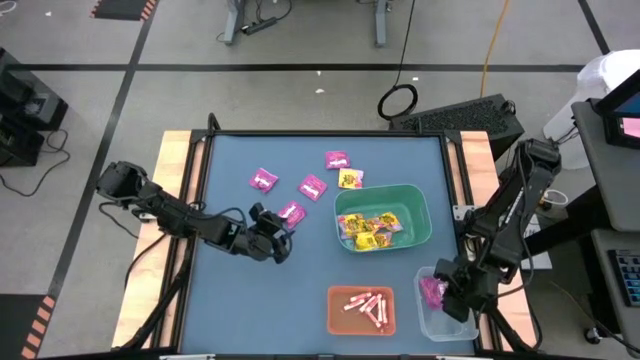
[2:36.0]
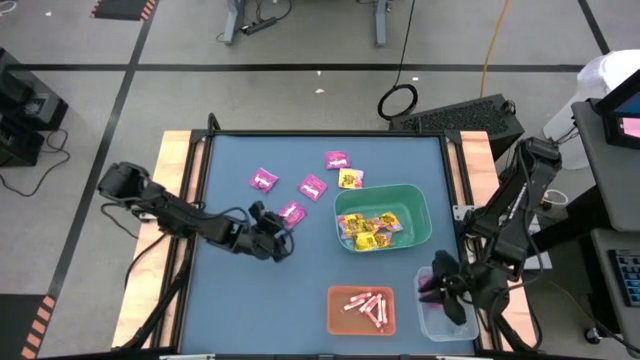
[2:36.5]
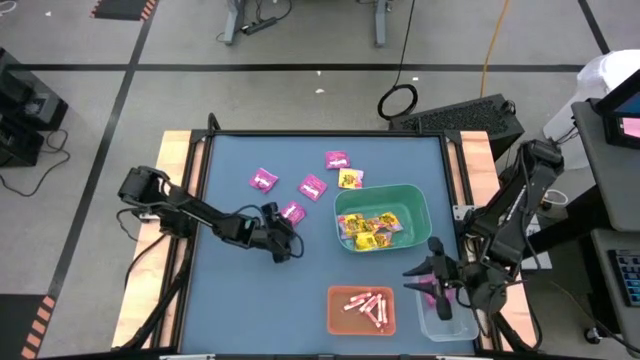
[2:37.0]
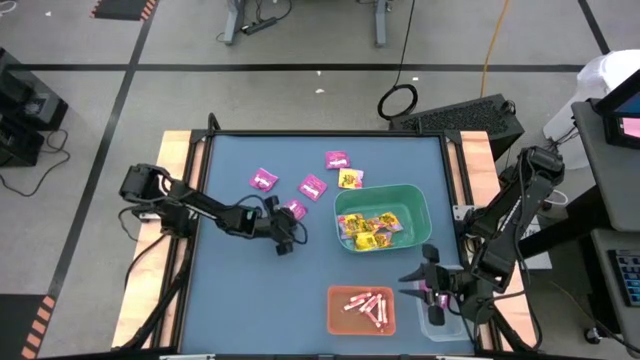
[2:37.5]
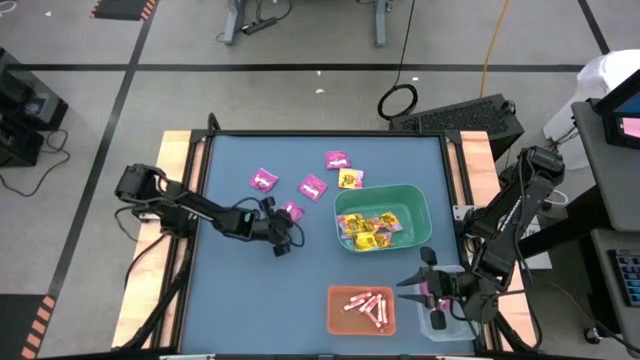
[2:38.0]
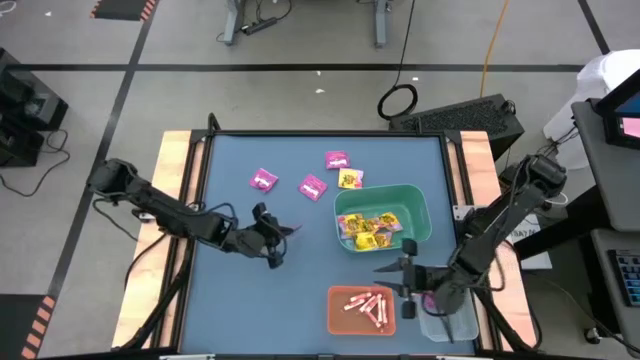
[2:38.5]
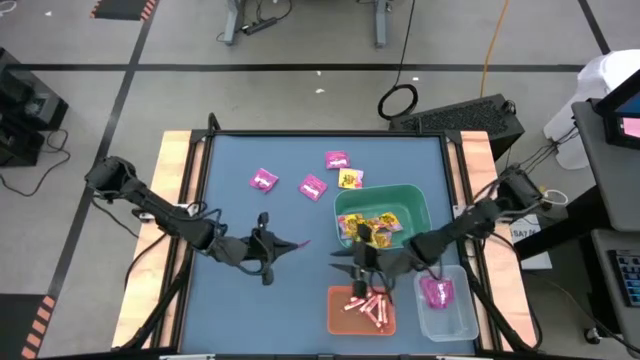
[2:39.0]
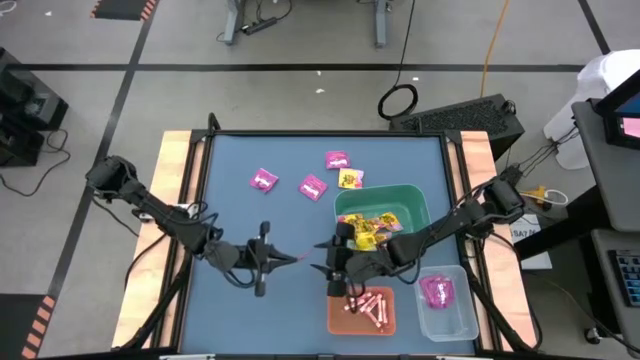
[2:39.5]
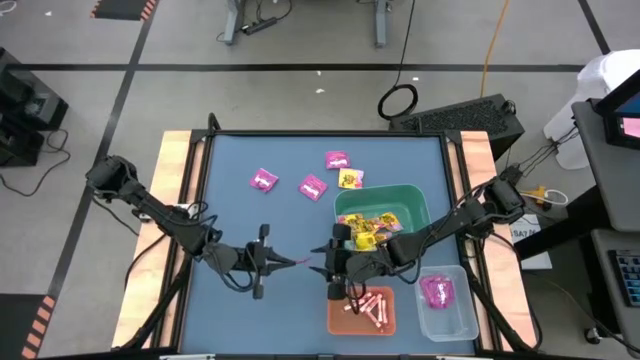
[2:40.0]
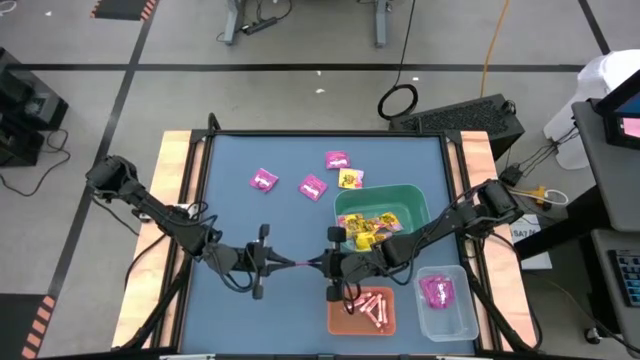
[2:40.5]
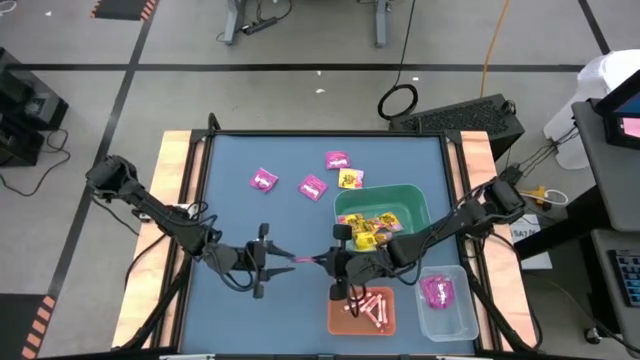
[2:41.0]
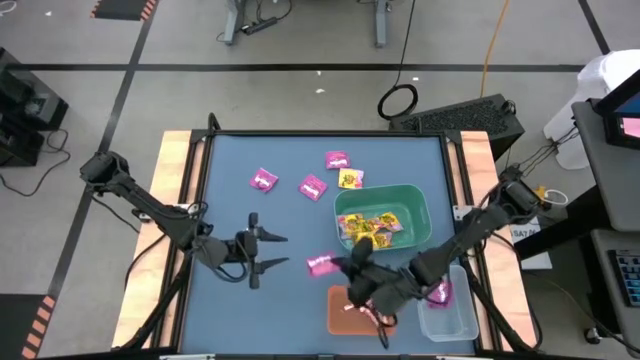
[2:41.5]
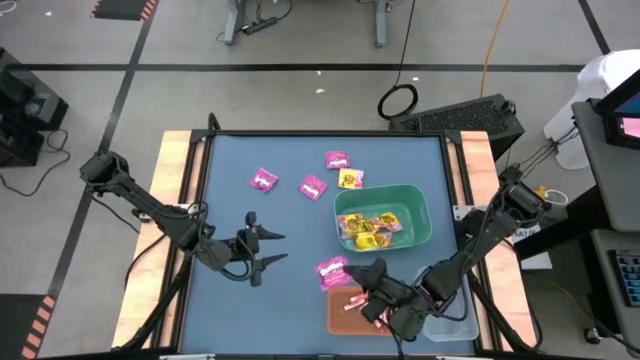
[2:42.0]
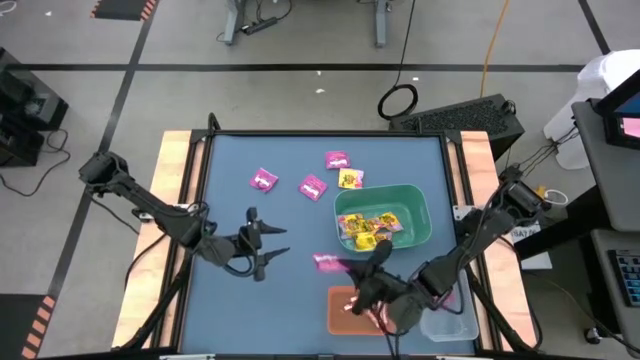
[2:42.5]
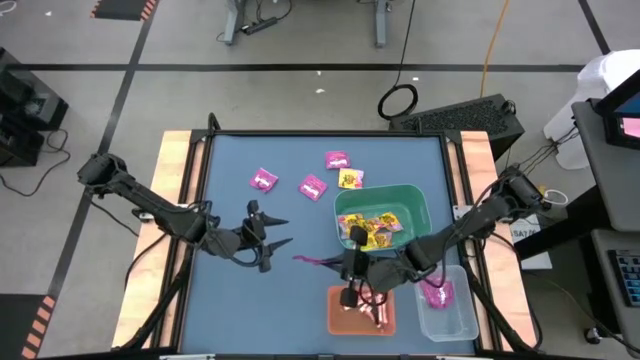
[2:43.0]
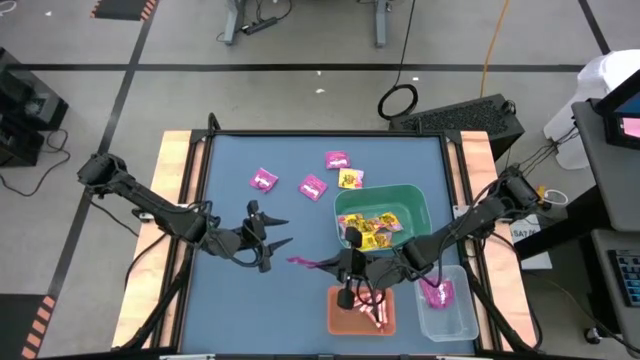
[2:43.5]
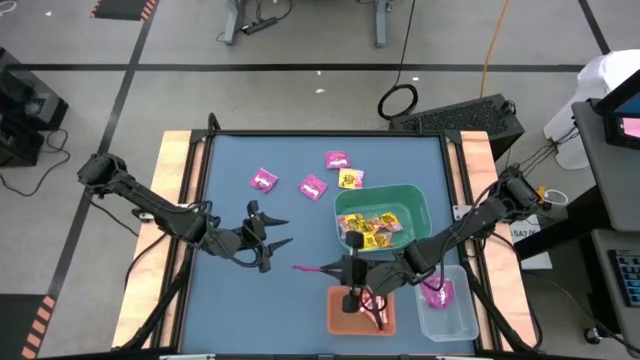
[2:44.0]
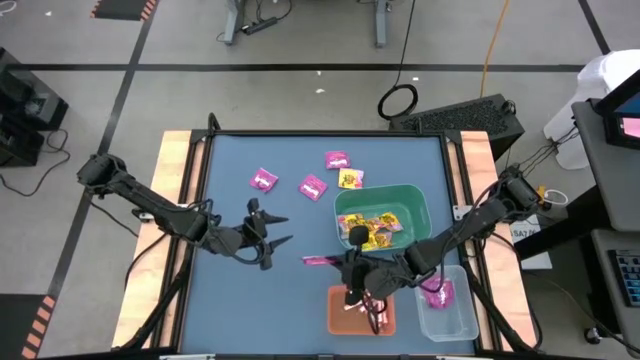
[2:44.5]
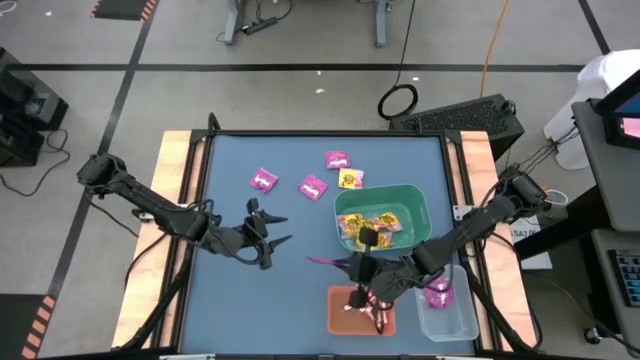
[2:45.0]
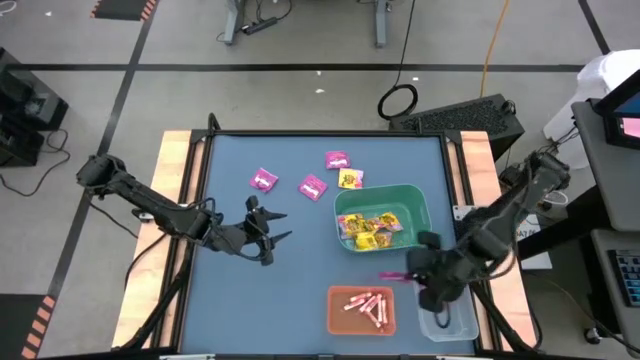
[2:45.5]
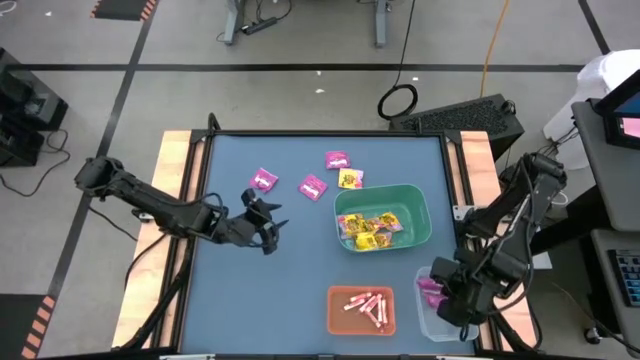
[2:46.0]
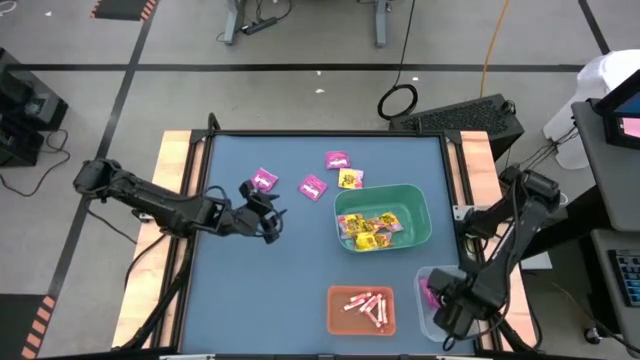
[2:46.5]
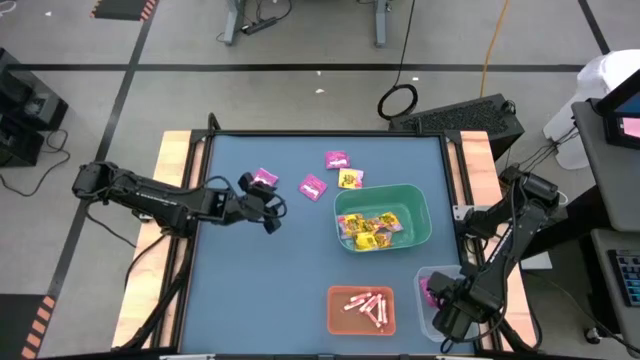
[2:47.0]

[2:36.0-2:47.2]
Task: Sort candy
Put the purple candy pack into the transparent bin

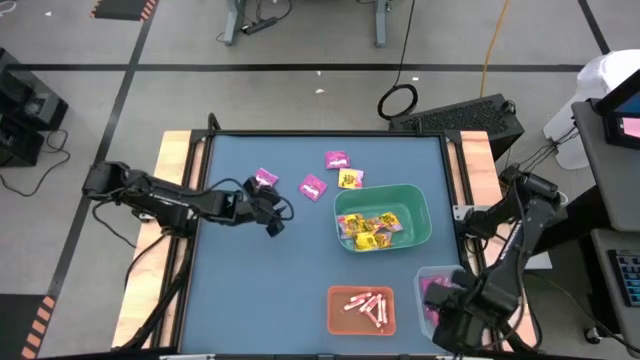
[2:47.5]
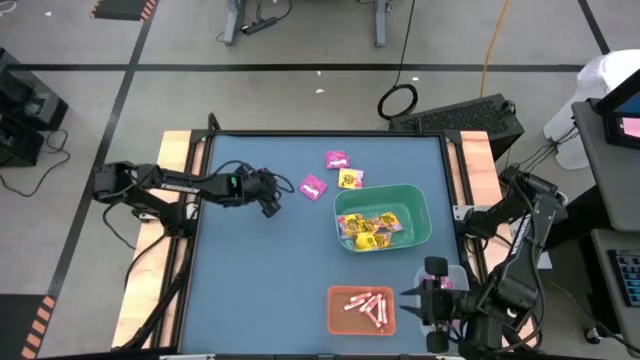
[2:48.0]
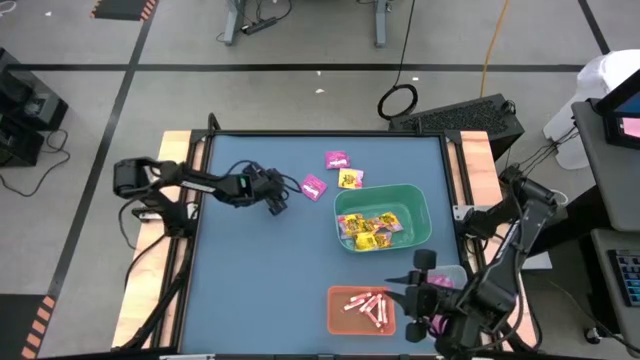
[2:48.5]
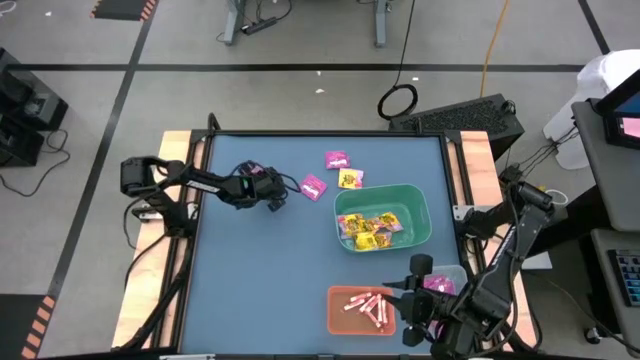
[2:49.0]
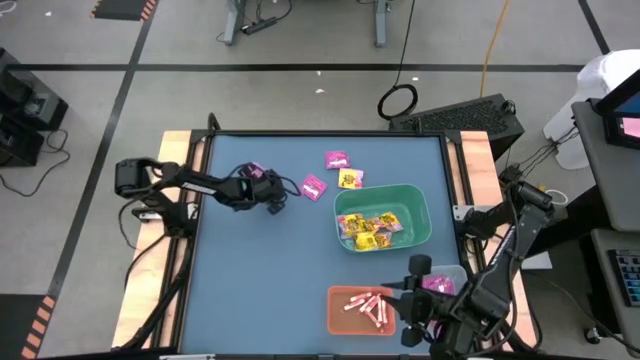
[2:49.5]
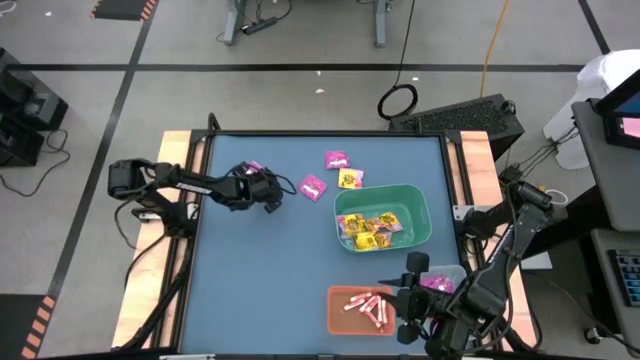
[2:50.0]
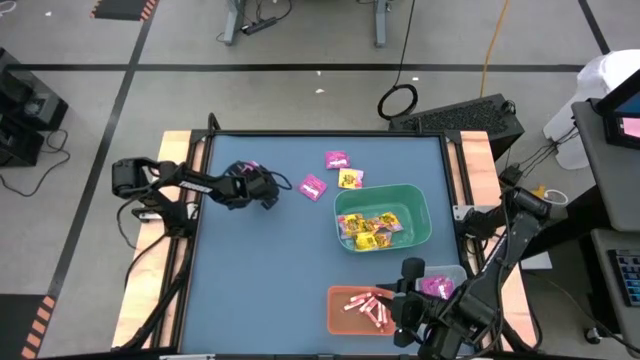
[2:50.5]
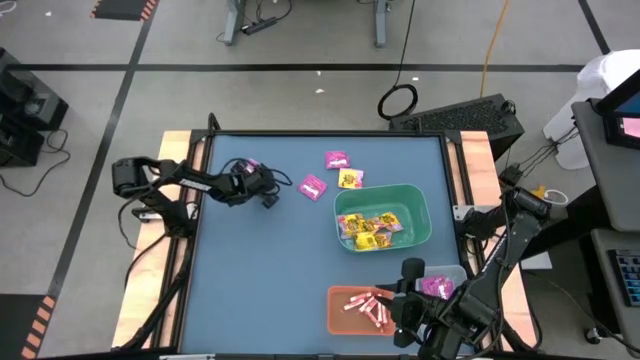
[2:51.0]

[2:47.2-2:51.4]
Put the purple candy pack into the transparent bin

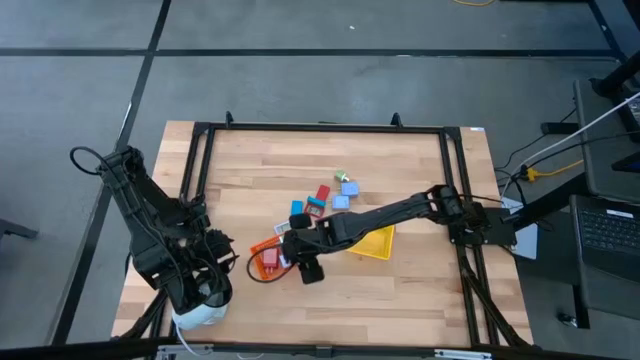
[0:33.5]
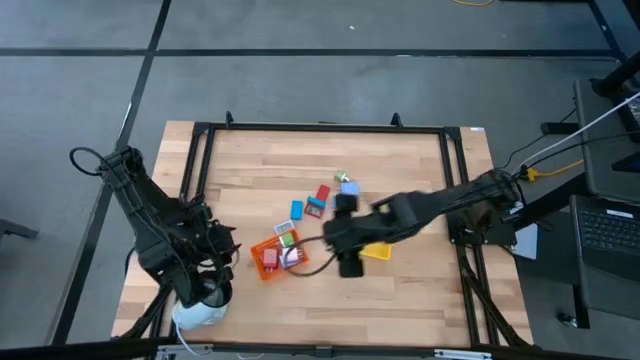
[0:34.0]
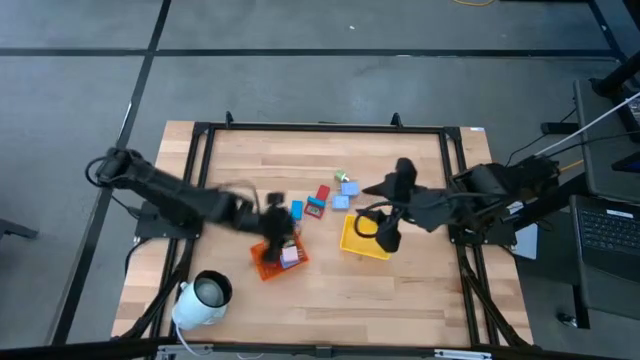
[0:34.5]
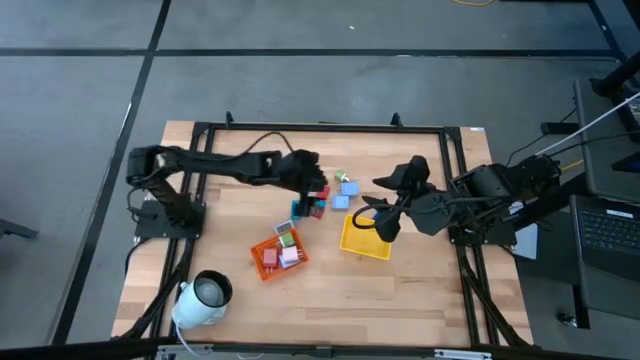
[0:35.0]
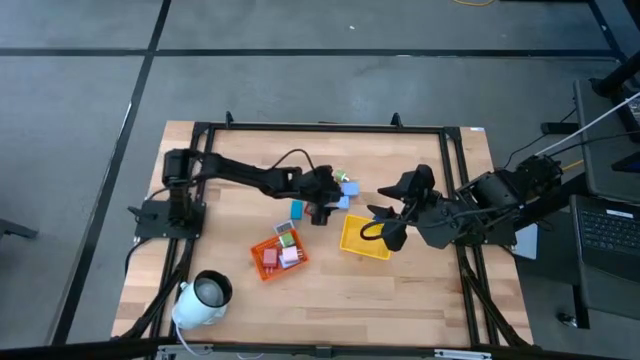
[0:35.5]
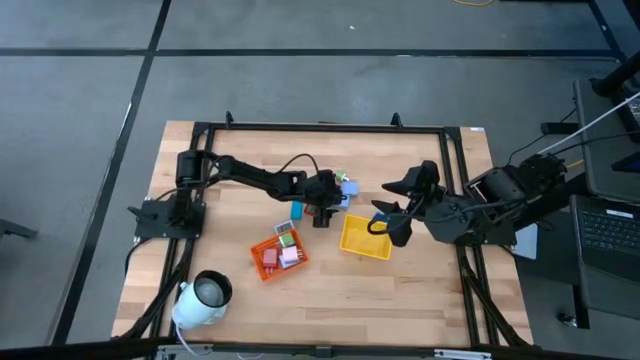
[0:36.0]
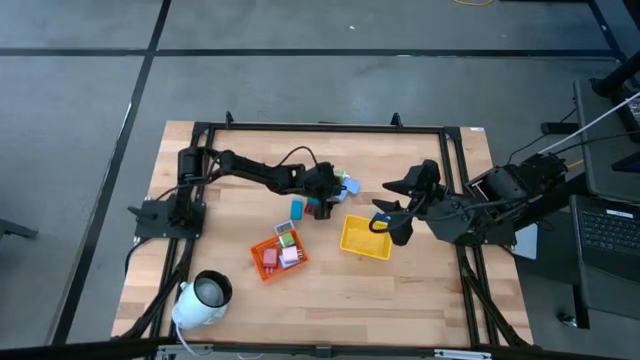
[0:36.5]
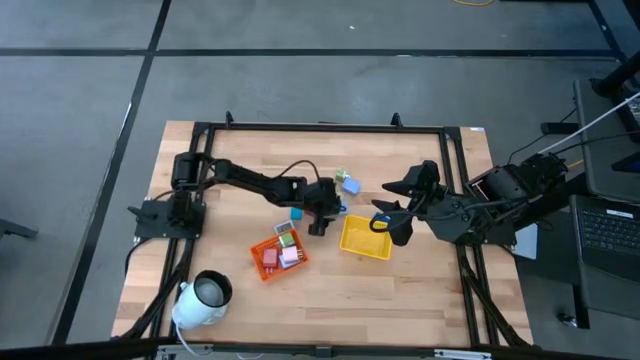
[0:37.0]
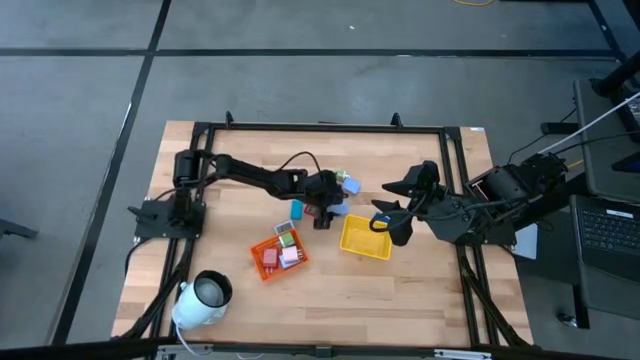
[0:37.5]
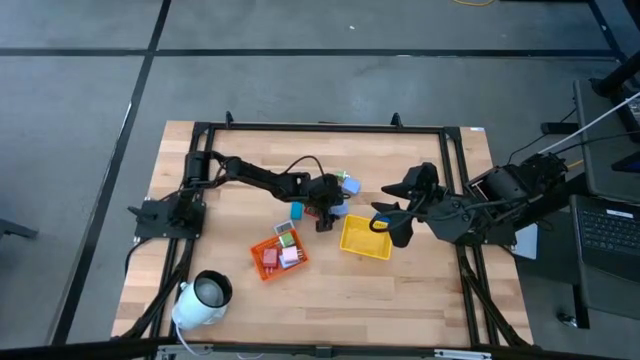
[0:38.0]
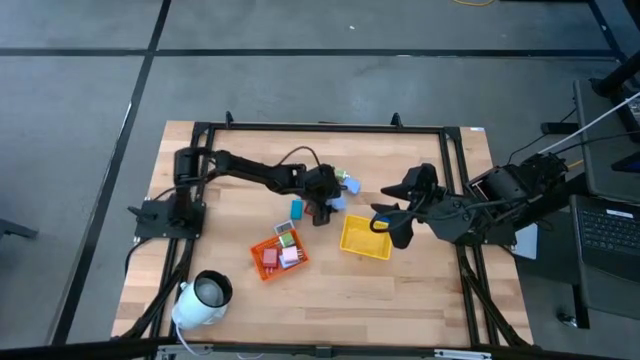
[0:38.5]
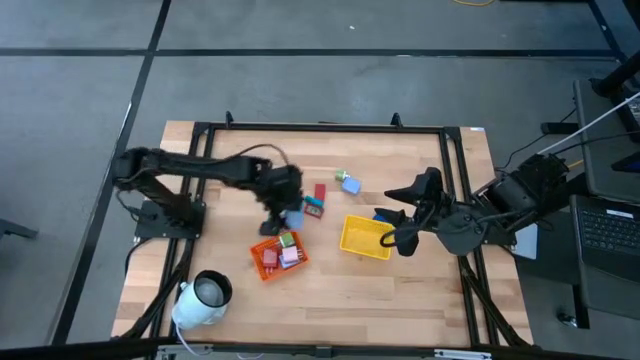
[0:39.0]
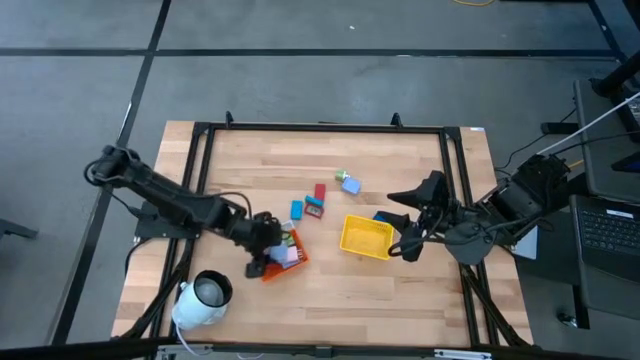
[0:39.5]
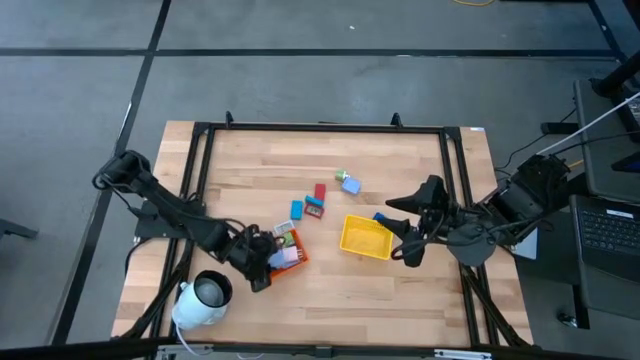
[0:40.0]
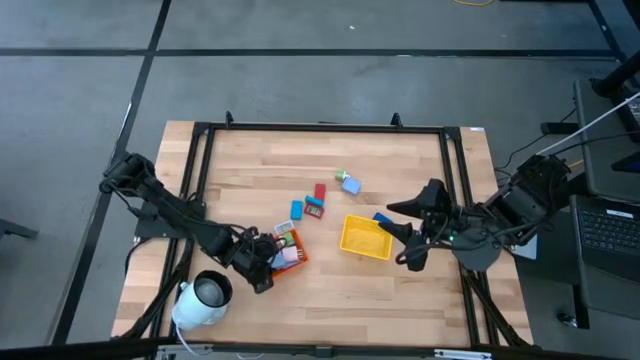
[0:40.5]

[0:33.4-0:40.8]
Task: Pick & Place Office items
Put the bottom light violet charger adapter into the orange bin
